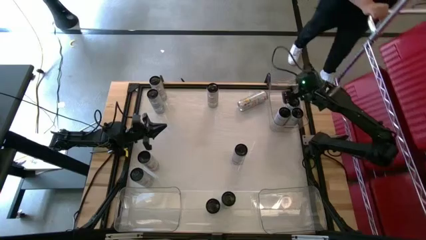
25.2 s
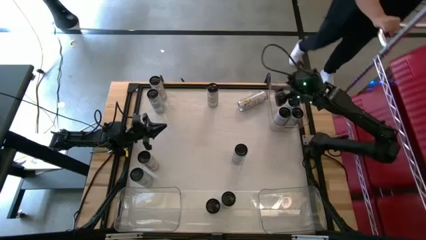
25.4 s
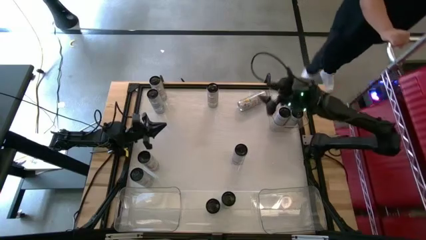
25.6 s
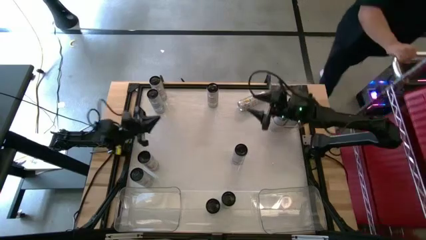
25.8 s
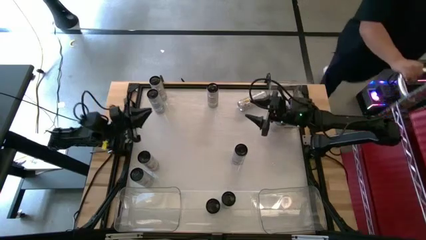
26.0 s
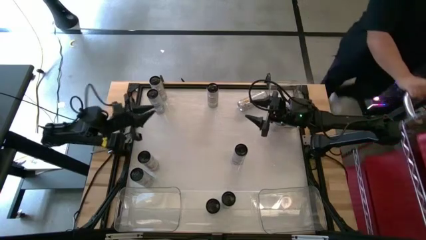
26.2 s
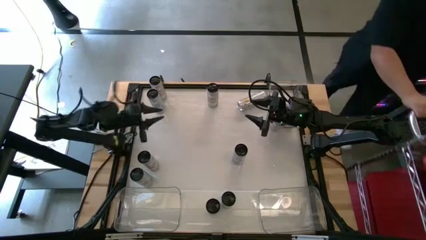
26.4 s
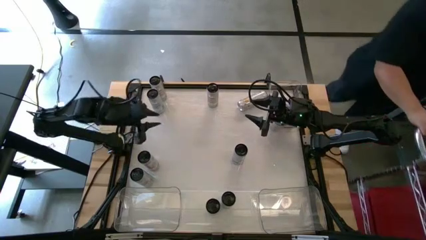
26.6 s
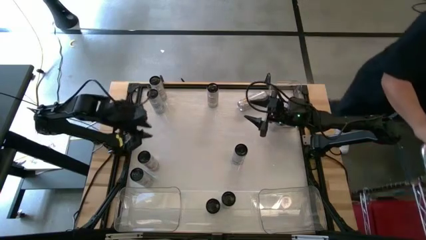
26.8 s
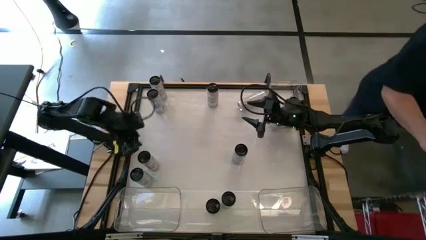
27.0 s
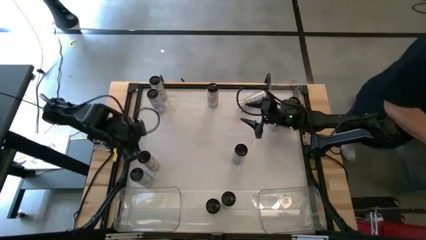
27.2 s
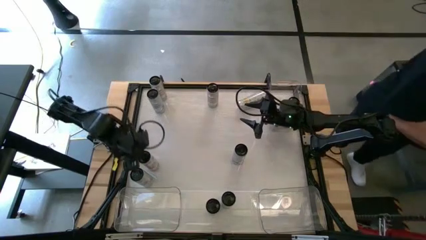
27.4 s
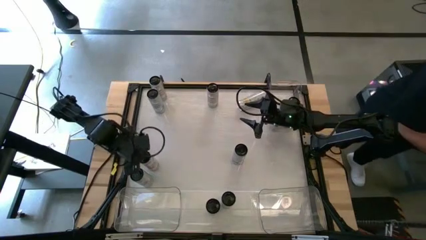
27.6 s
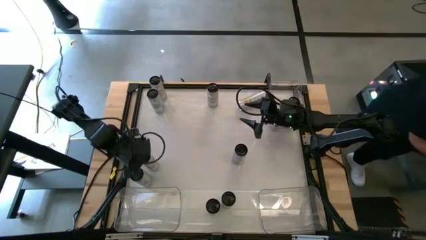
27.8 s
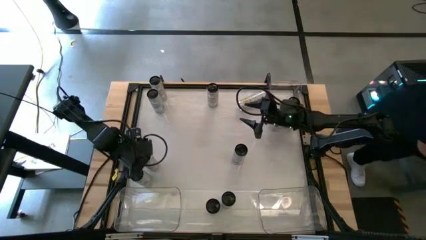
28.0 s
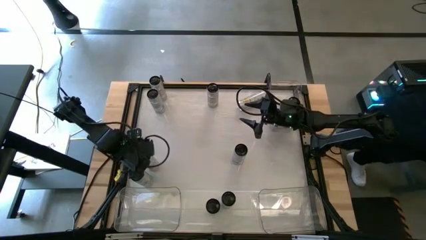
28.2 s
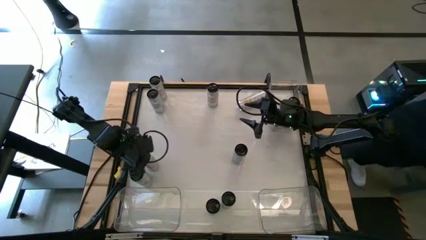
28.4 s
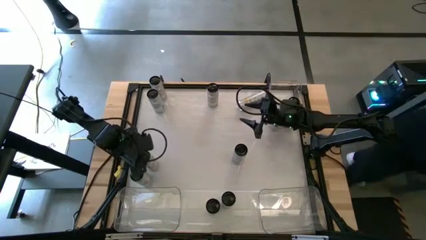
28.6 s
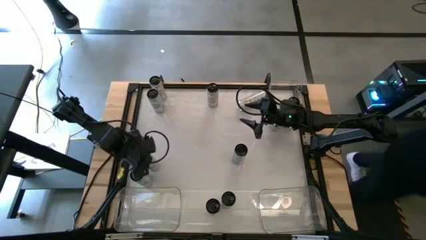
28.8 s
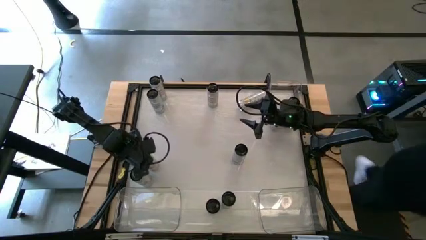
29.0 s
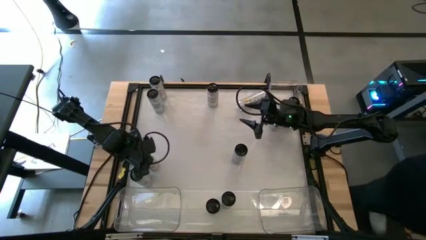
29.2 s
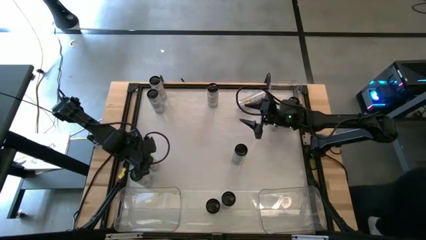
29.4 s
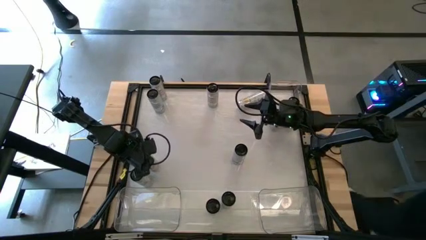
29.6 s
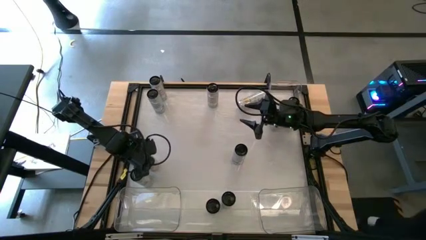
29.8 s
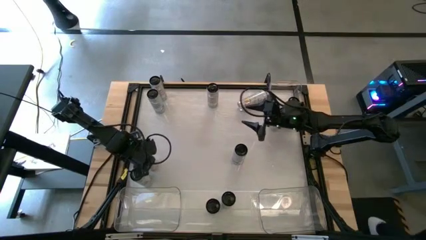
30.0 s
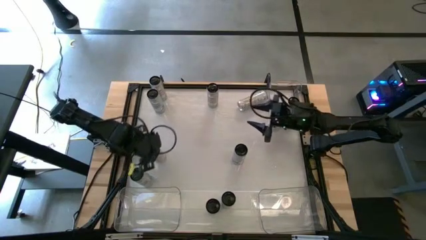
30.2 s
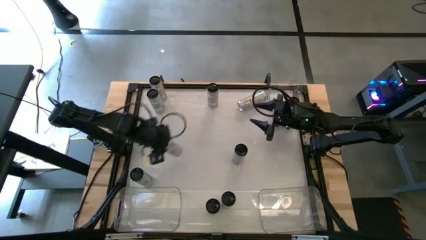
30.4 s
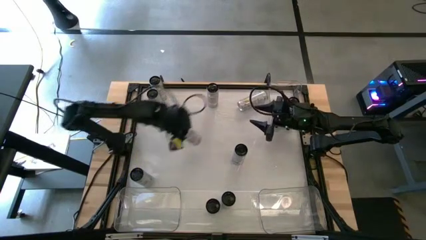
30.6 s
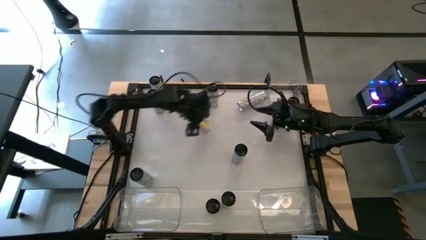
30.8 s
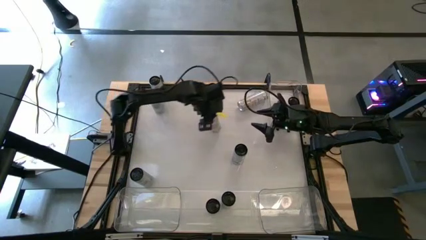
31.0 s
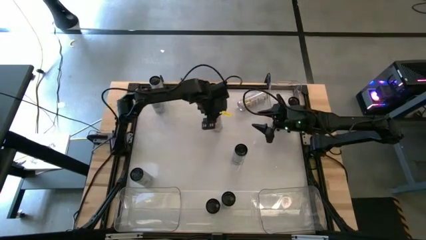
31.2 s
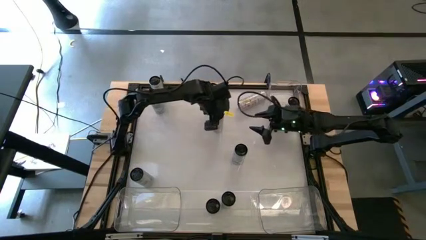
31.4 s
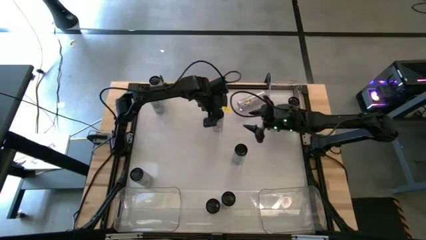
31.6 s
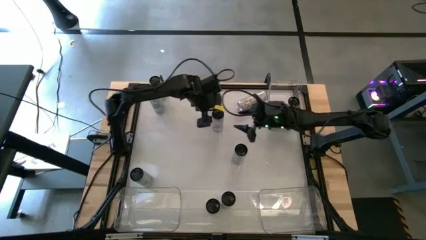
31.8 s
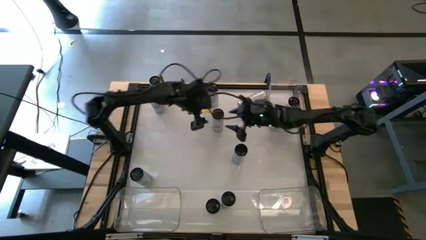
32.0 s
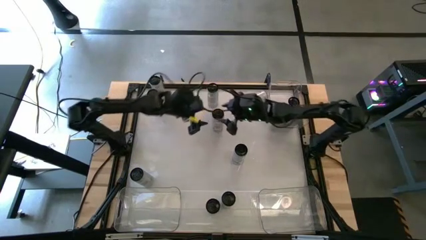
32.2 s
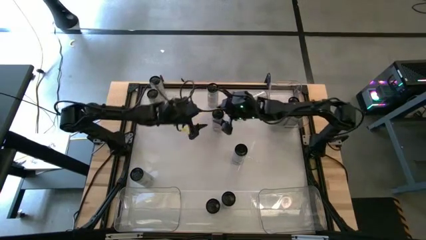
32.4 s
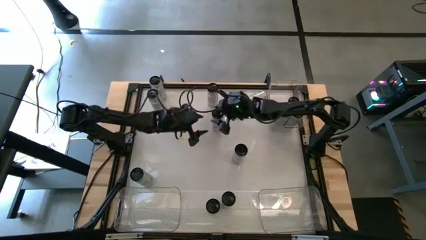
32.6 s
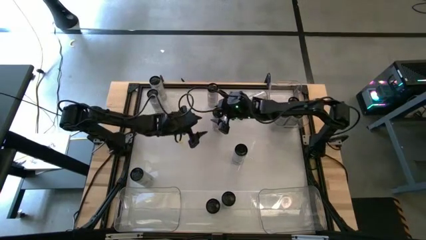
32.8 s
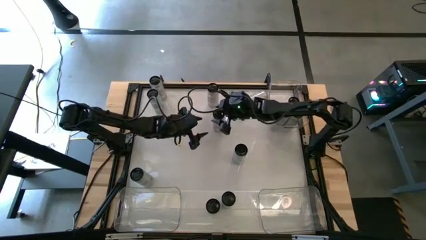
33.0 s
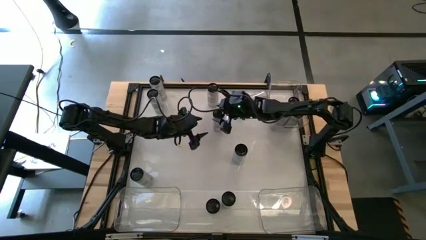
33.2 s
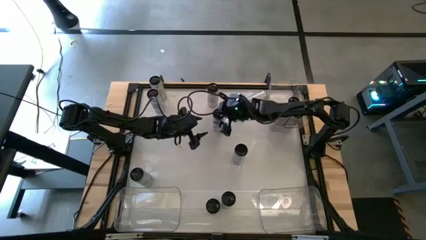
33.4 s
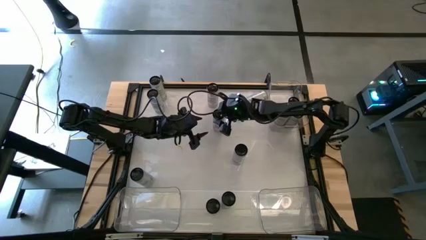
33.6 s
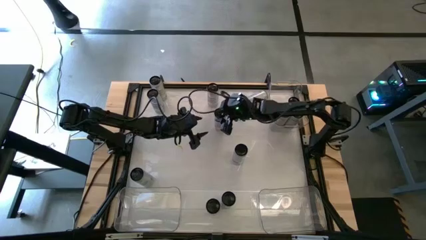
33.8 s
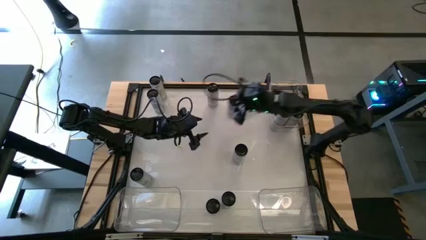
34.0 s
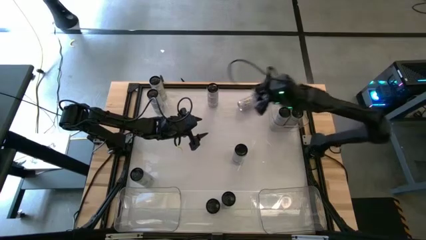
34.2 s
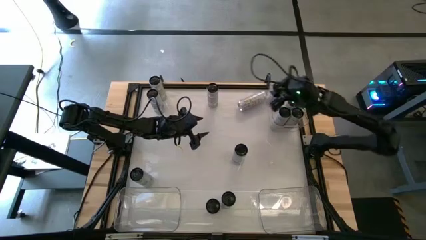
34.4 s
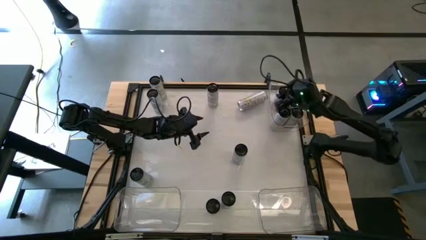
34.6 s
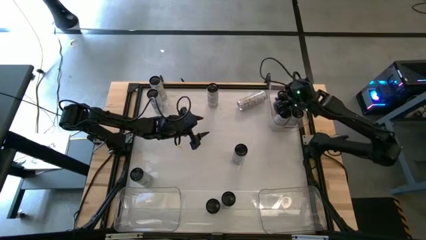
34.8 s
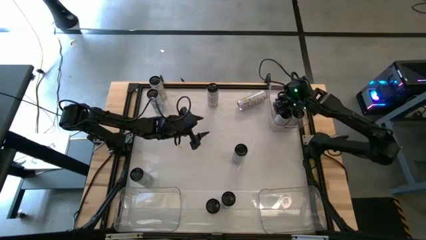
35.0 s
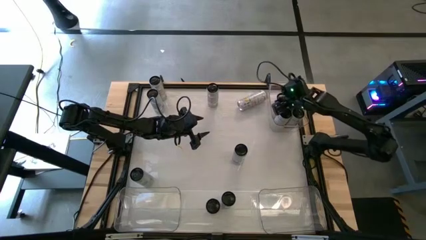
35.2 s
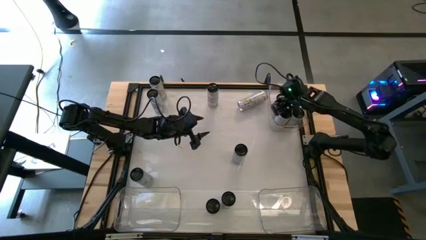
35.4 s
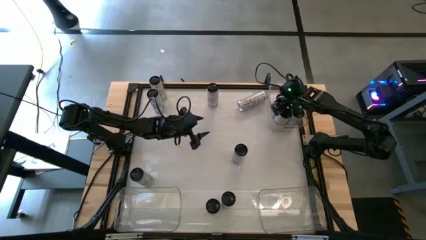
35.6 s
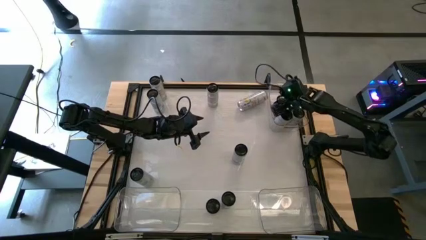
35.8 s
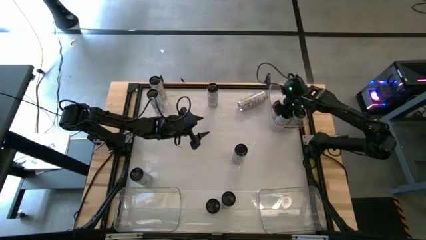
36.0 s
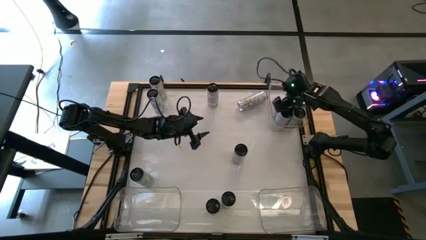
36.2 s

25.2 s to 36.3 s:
Task: Sort soda cans
Put the white-pink soda can into the top transparent bin

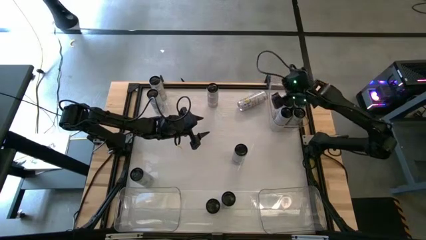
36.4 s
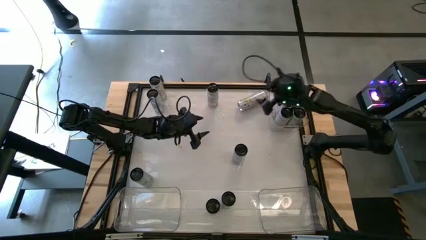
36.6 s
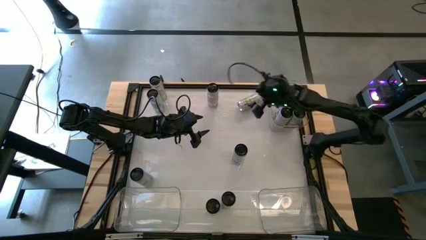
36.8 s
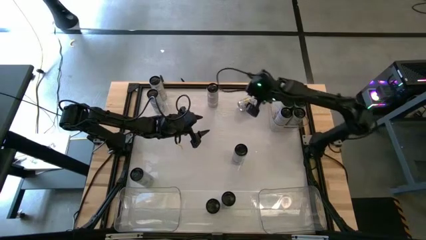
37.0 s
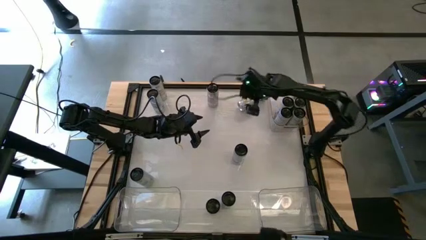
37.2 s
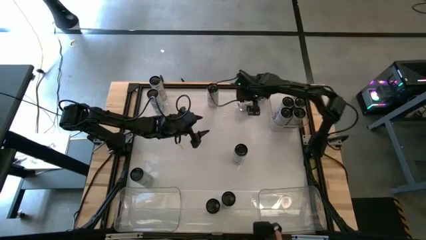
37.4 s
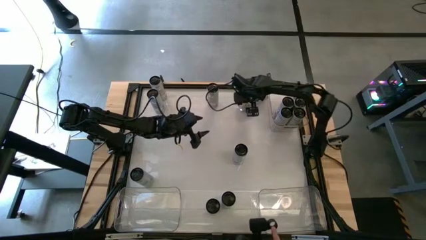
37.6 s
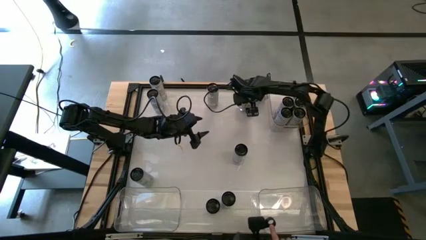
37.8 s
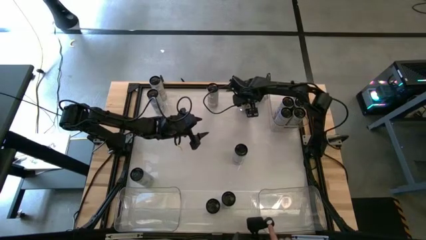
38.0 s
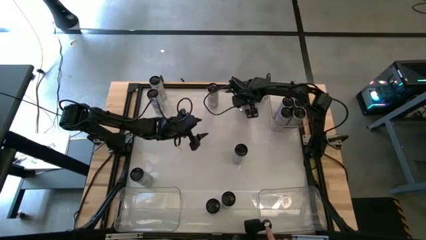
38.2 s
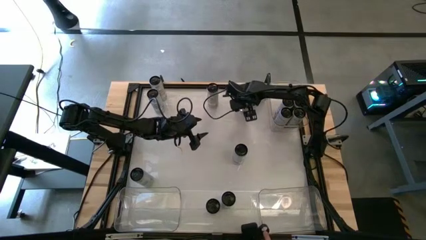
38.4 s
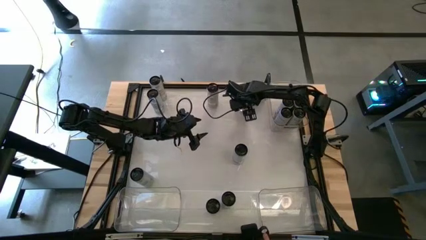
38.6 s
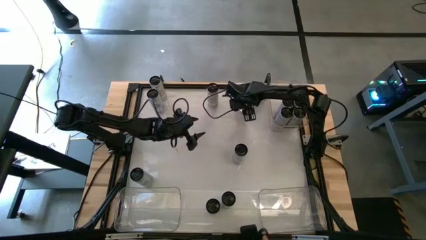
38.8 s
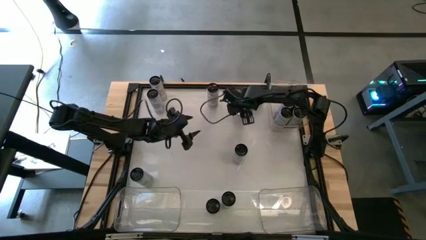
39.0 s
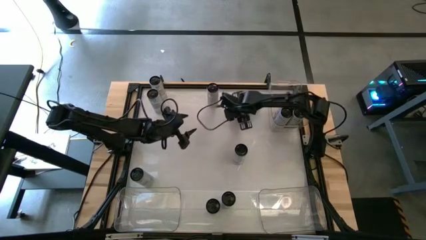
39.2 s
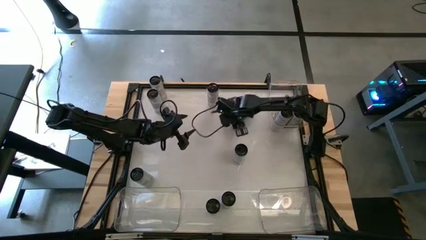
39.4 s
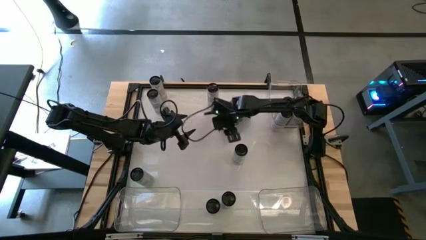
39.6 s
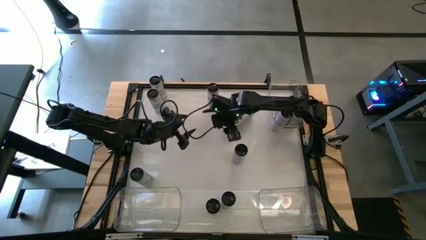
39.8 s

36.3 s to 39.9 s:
Put the top right white-yellow soda can into the bottom right transparent bin
